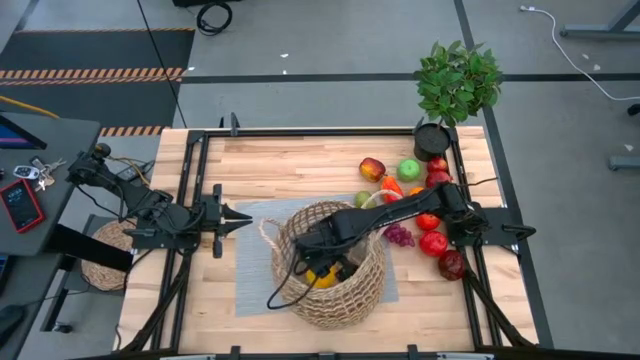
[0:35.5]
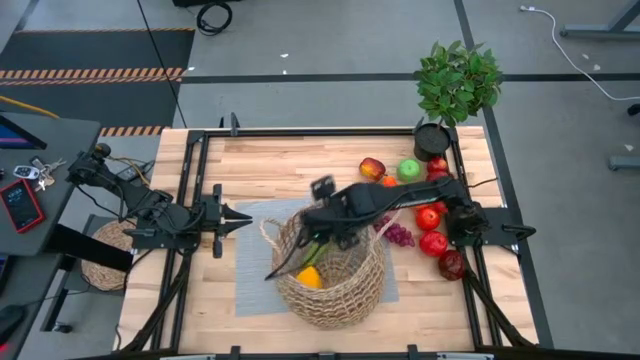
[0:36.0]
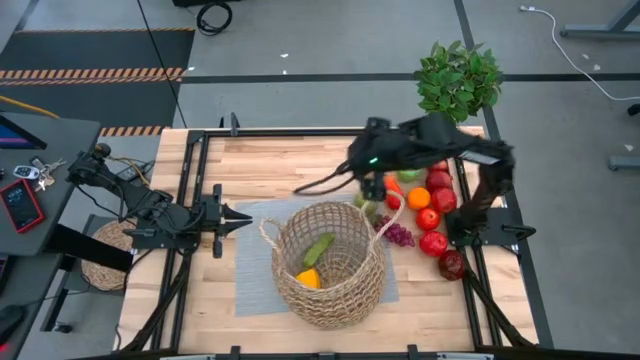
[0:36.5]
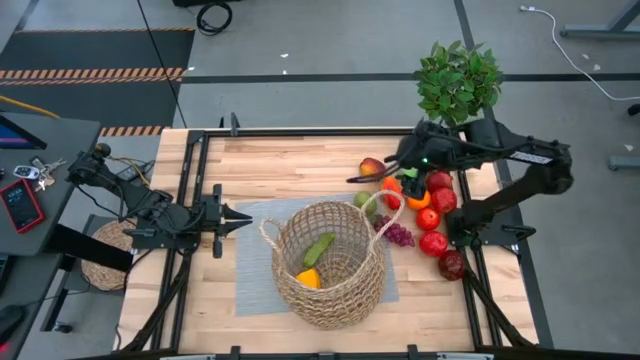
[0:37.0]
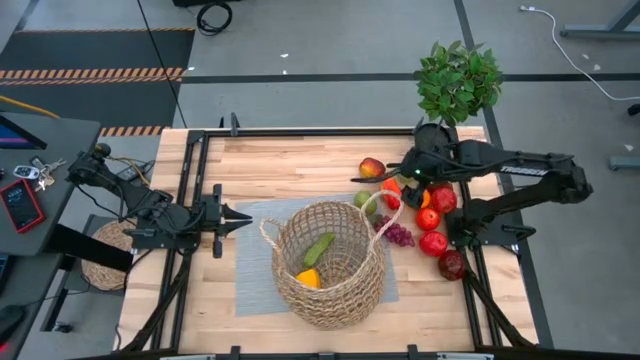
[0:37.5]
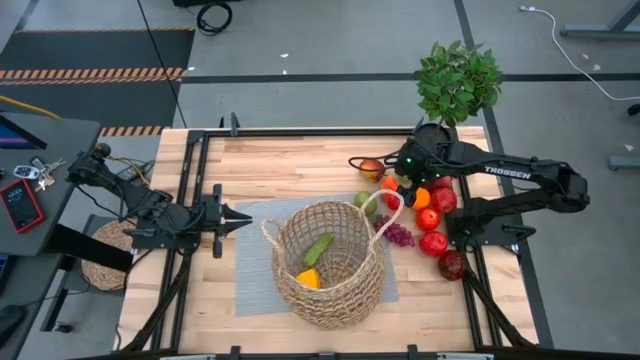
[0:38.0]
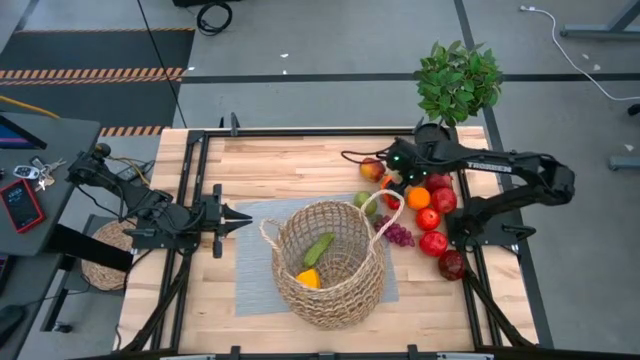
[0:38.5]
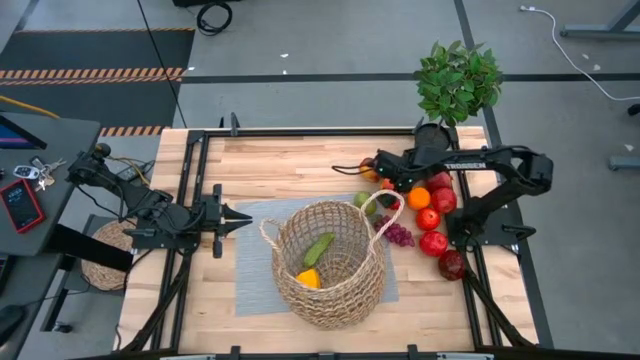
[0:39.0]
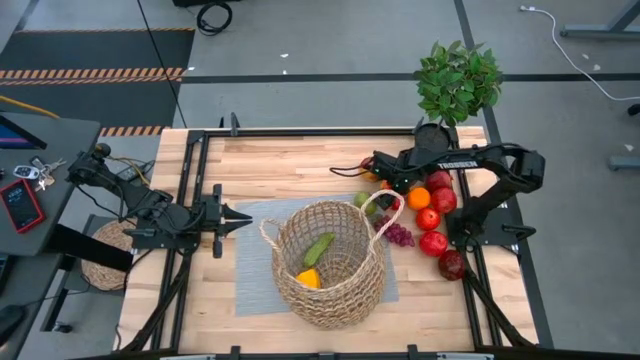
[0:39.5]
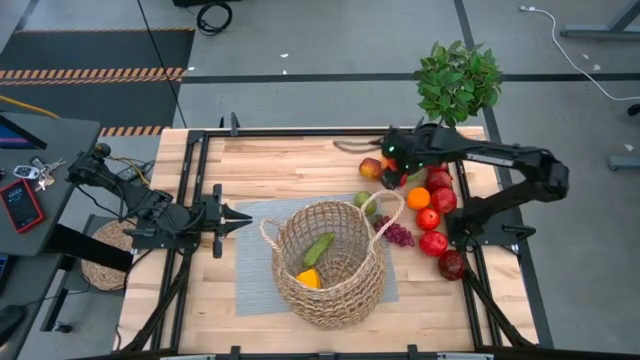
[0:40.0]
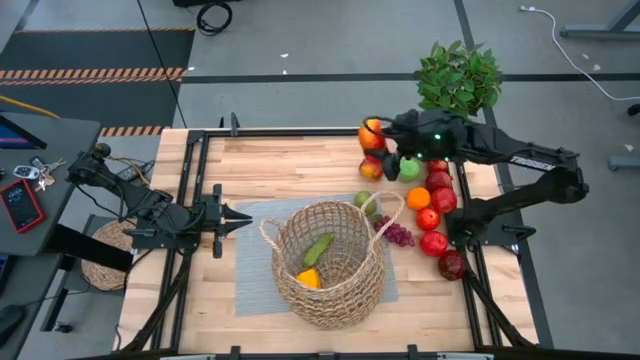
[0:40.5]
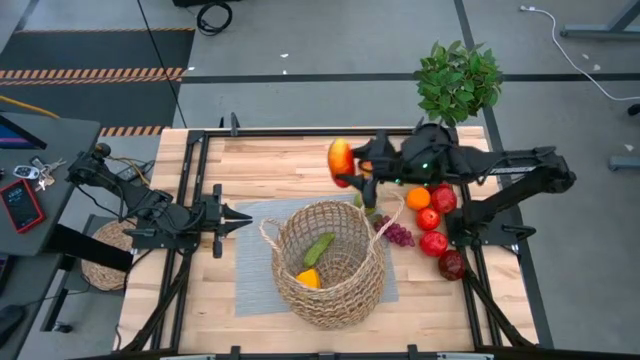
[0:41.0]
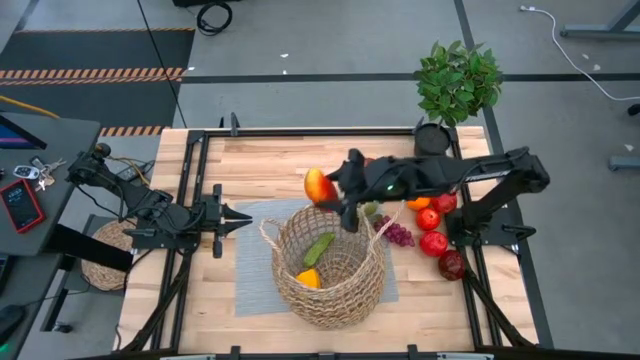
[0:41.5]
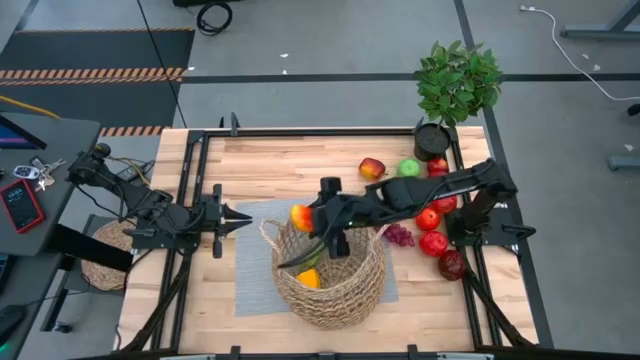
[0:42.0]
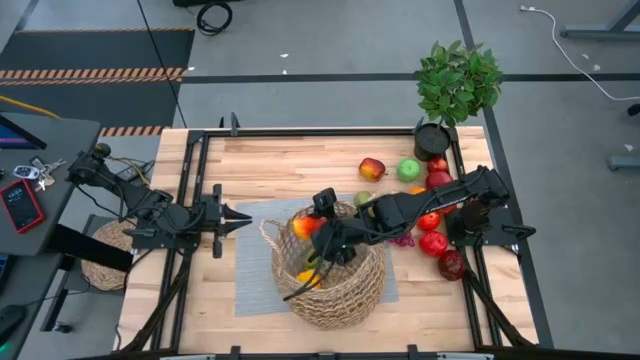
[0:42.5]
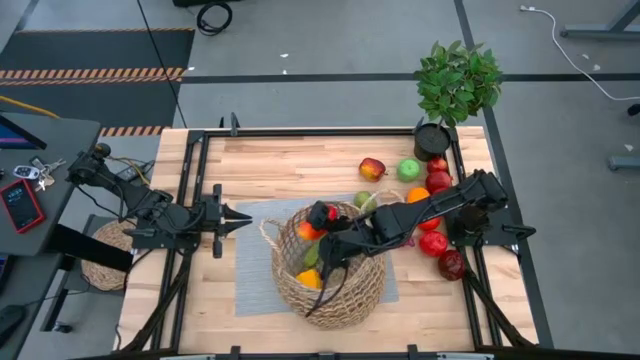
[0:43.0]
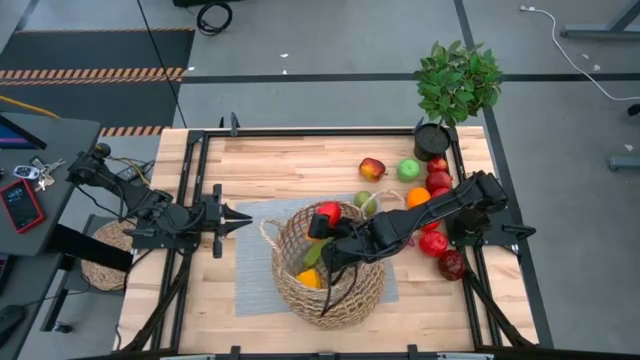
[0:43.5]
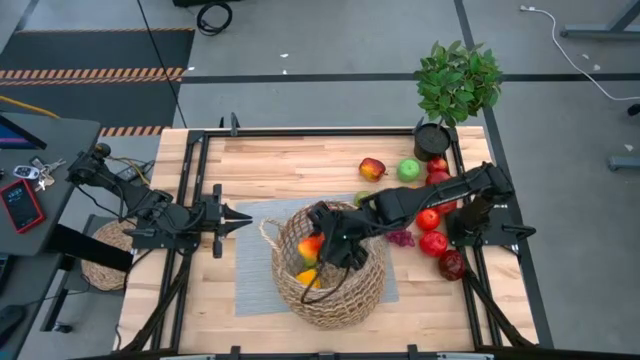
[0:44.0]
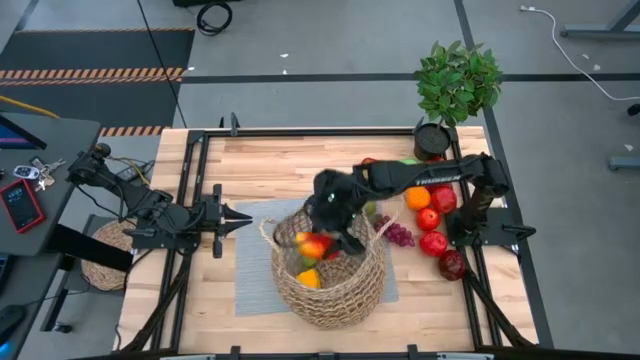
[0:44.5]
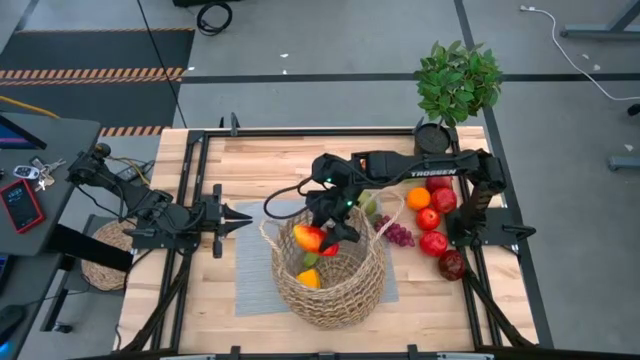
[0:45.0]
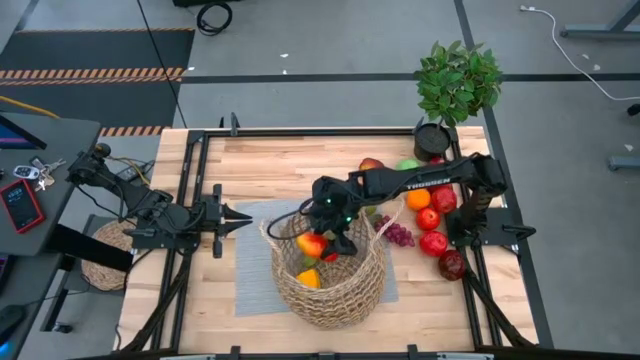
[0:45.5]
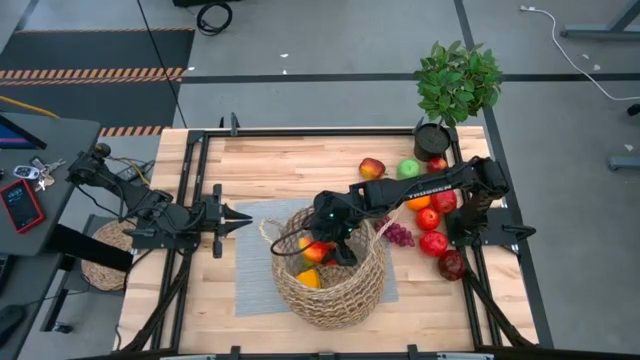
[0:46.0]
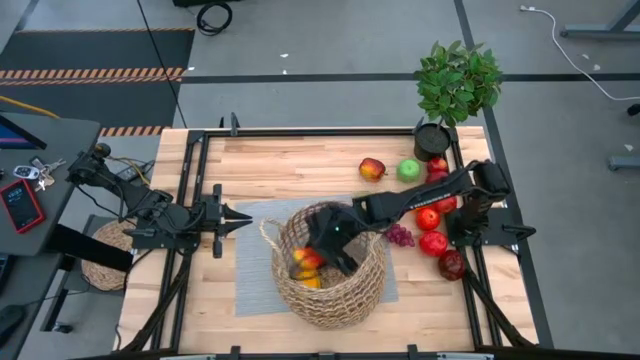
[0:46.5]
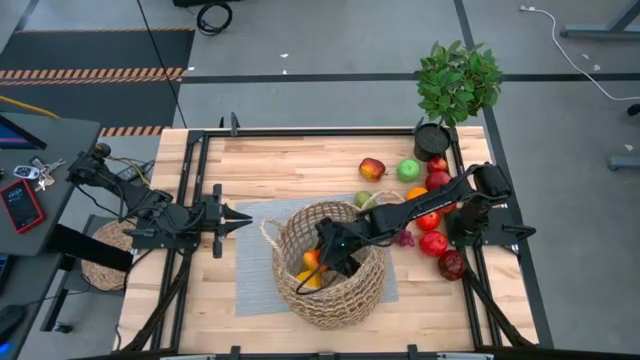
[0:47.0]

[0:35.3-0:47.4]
Task: Build produce basket
Put the mango into the basket

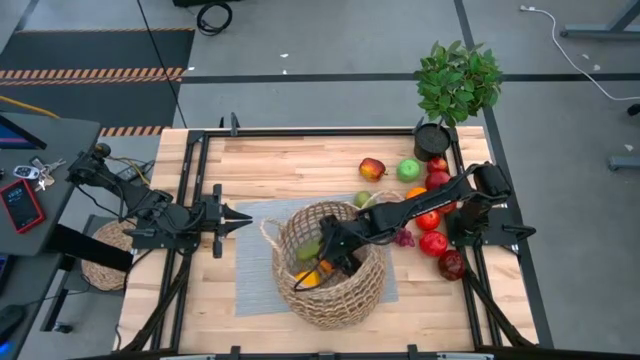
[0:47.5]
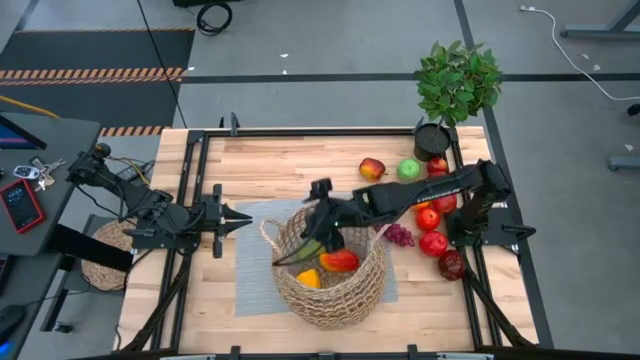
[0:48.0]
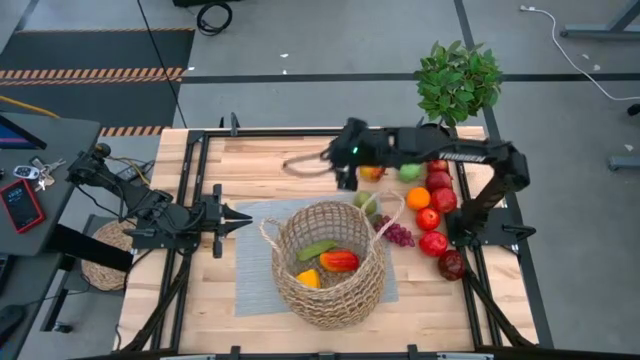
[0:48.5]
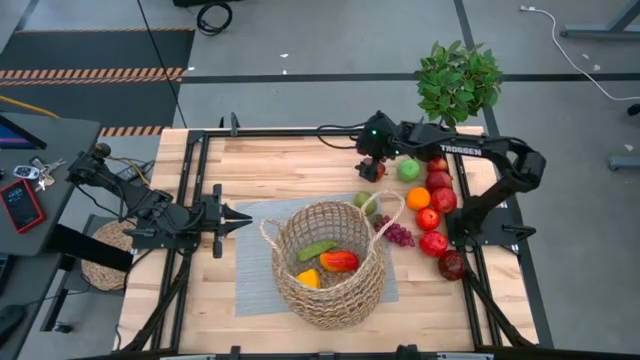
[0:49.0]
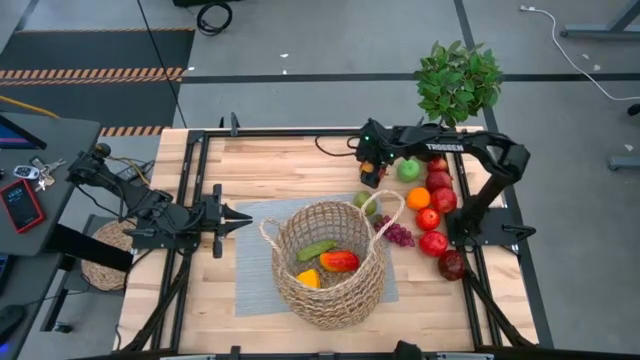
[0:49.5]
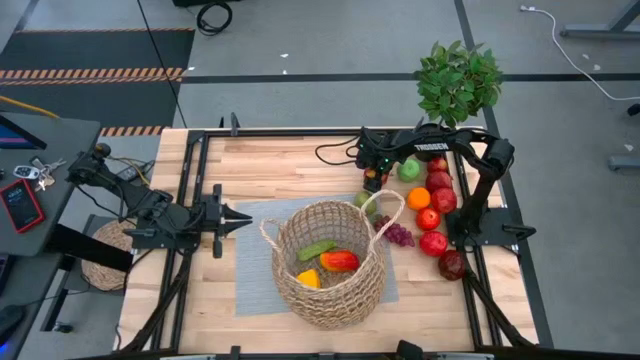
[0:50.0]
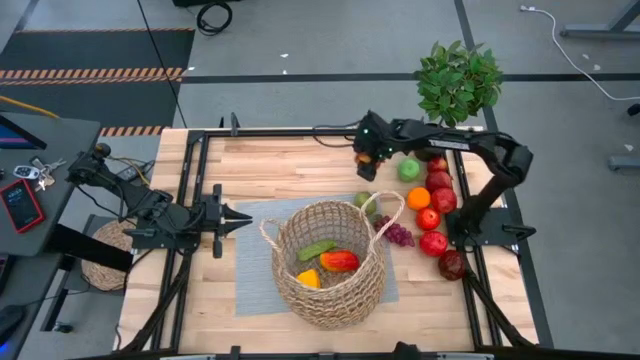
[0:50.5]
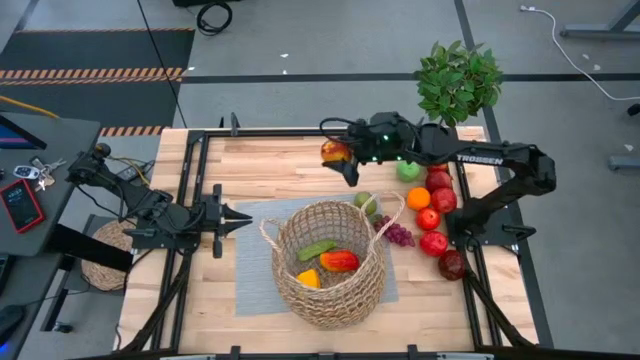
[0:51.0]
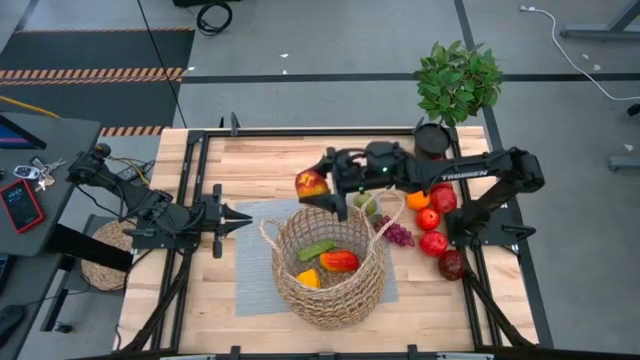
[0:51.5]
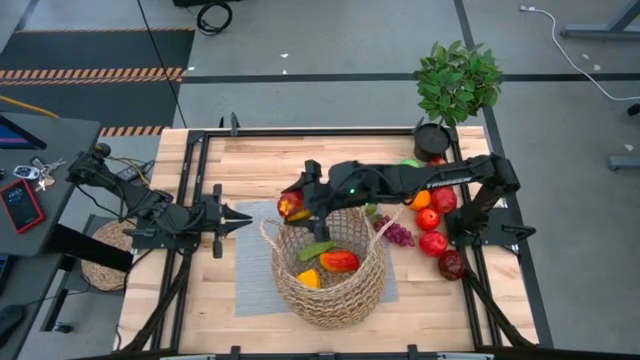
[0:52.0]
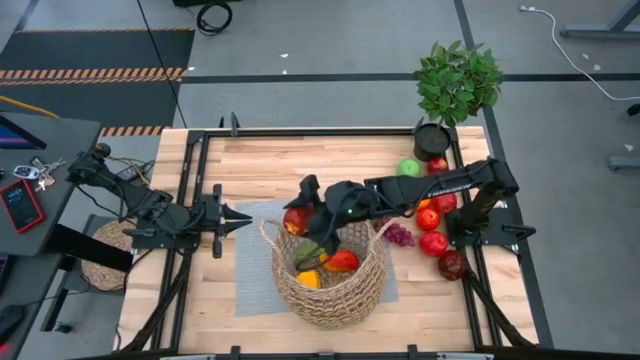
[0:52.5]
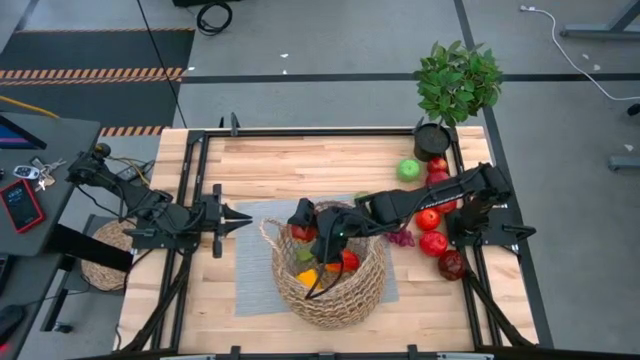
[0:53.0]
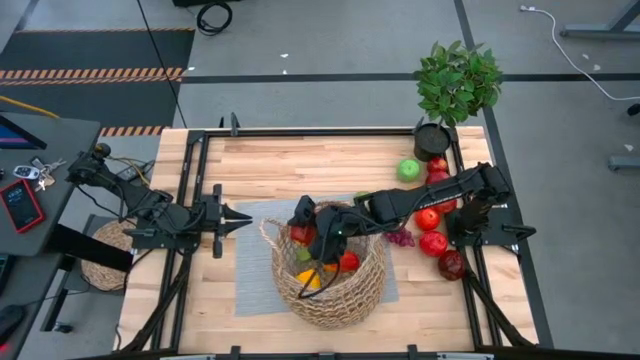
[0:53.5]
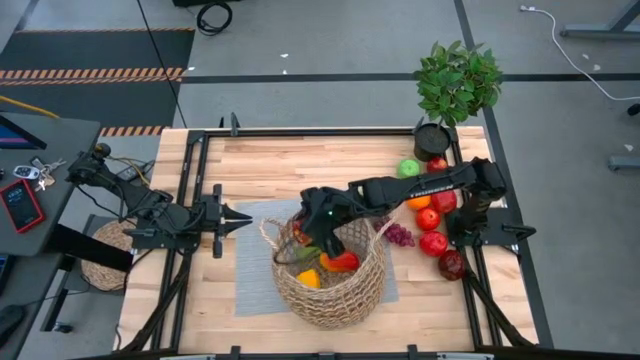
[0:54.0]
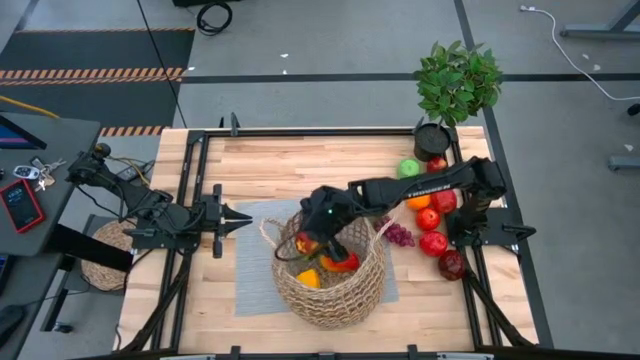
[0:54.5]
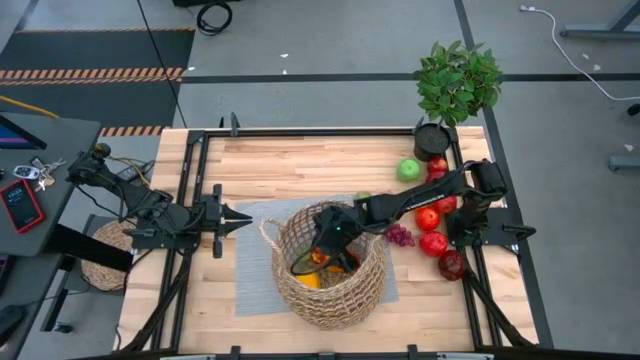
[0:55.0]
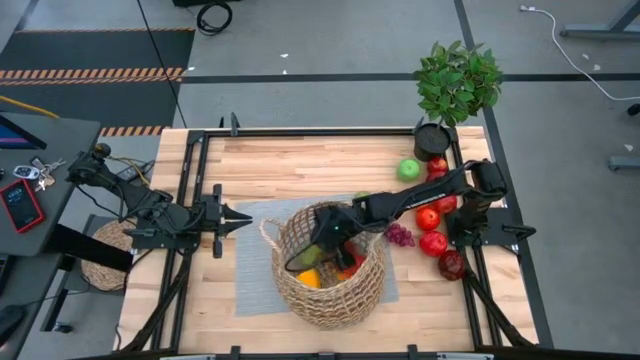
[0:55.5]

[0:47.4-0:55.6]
Put the red apple into the basket
